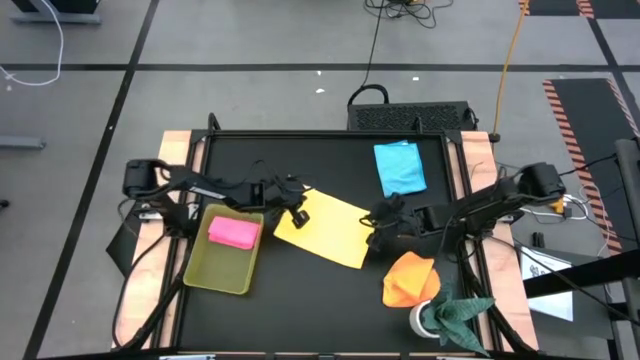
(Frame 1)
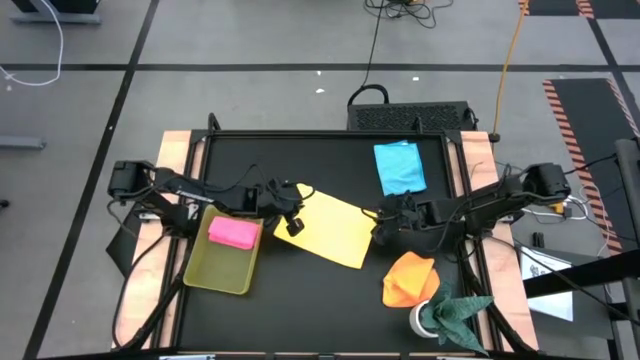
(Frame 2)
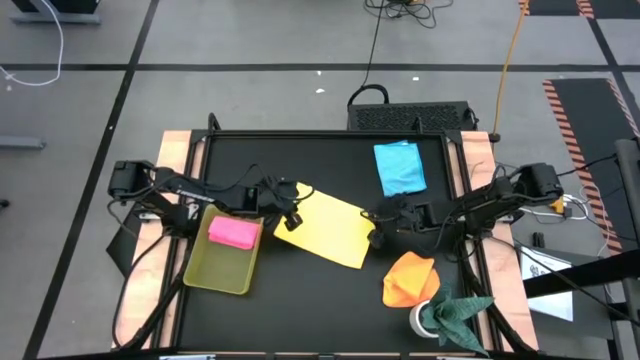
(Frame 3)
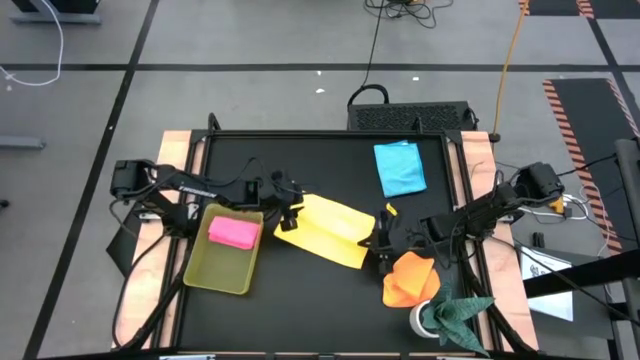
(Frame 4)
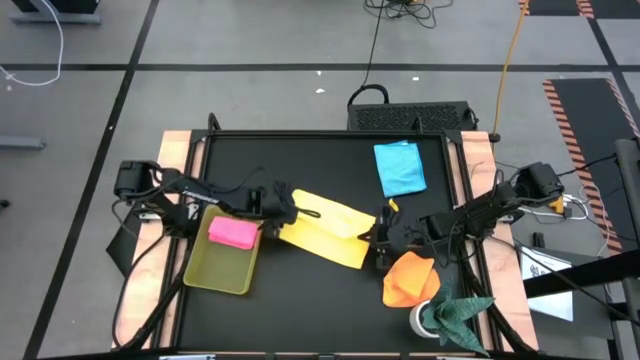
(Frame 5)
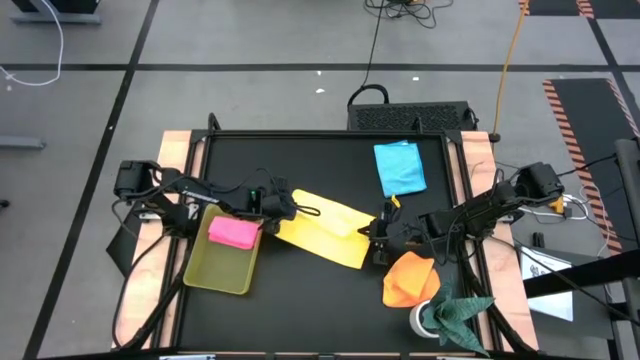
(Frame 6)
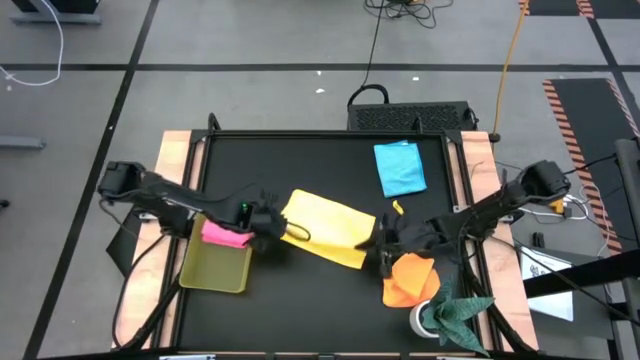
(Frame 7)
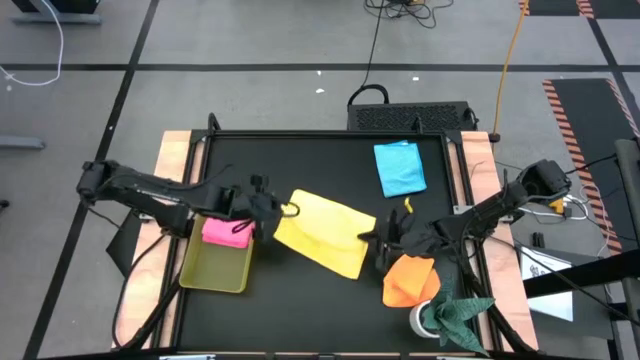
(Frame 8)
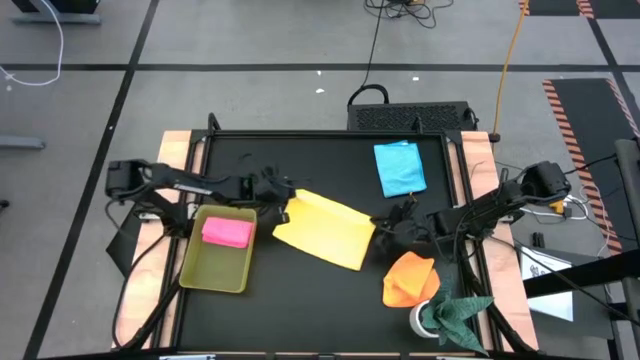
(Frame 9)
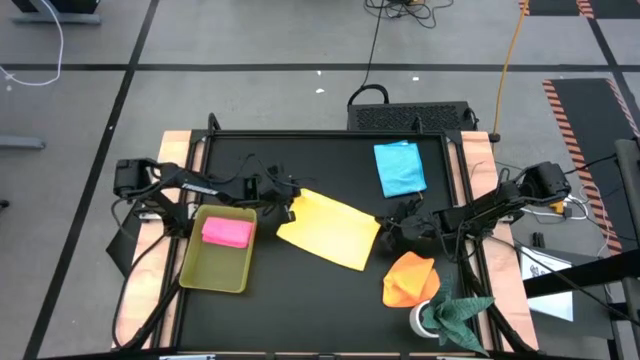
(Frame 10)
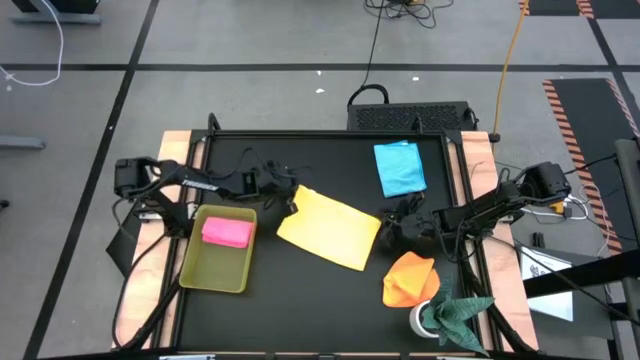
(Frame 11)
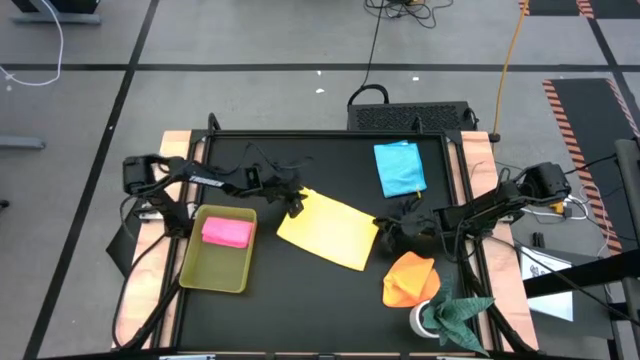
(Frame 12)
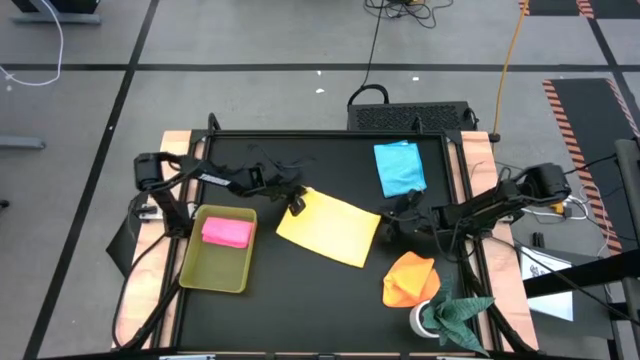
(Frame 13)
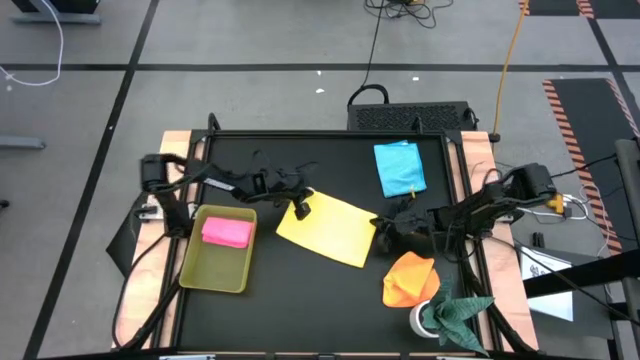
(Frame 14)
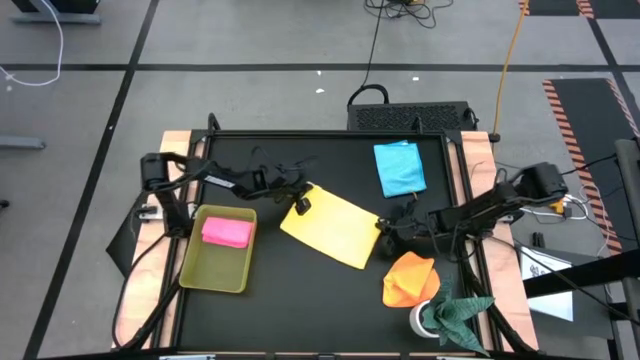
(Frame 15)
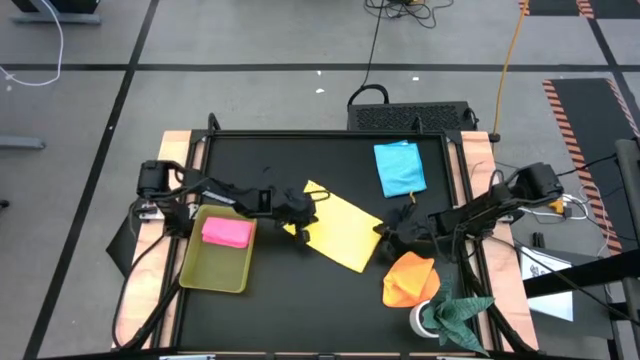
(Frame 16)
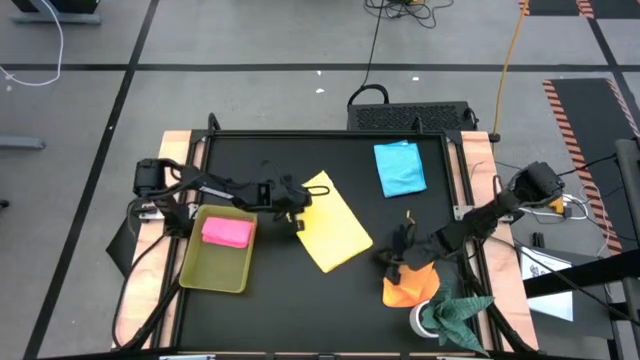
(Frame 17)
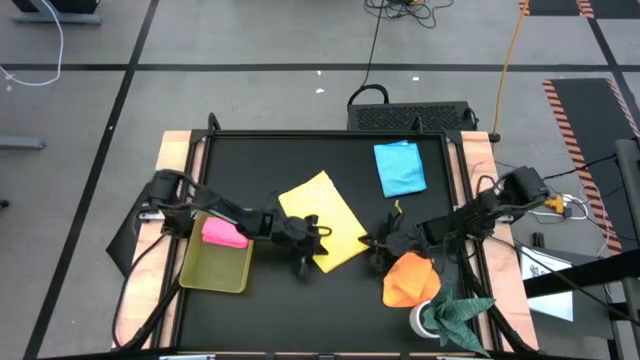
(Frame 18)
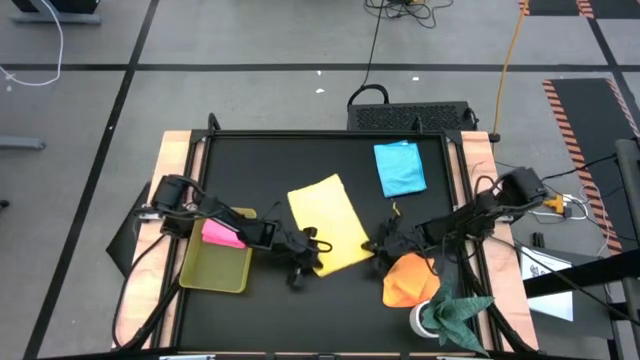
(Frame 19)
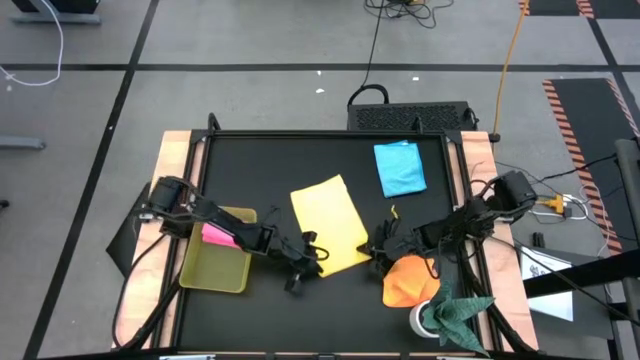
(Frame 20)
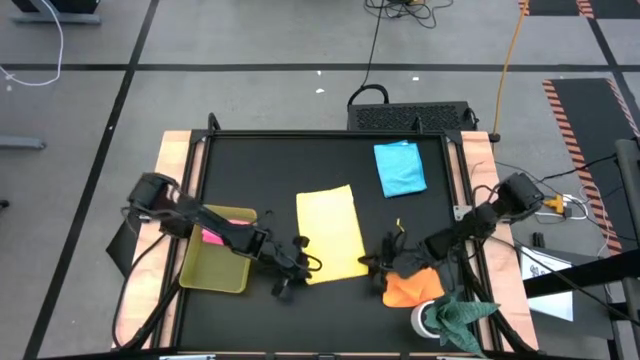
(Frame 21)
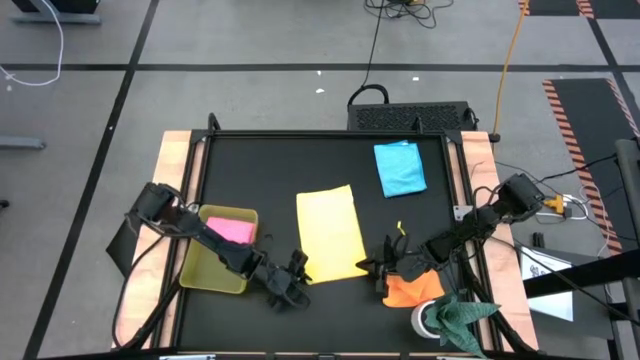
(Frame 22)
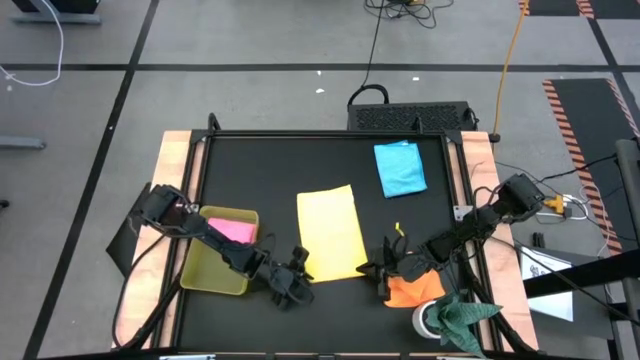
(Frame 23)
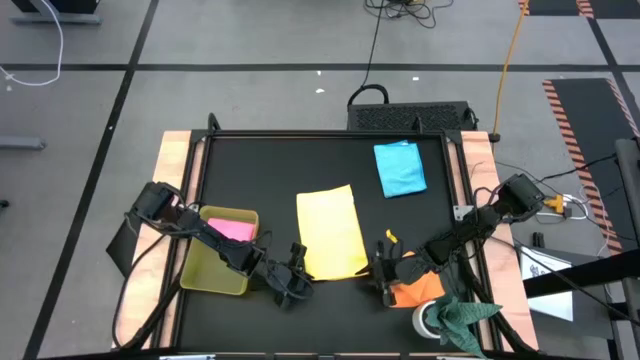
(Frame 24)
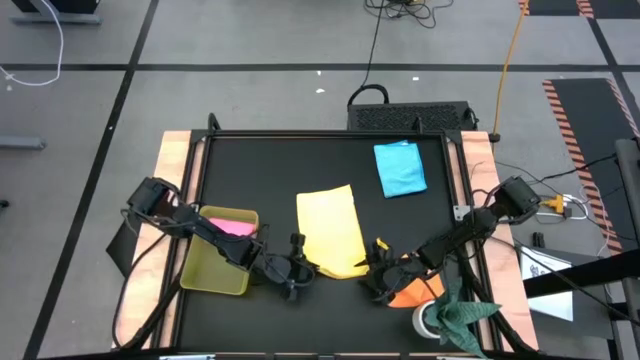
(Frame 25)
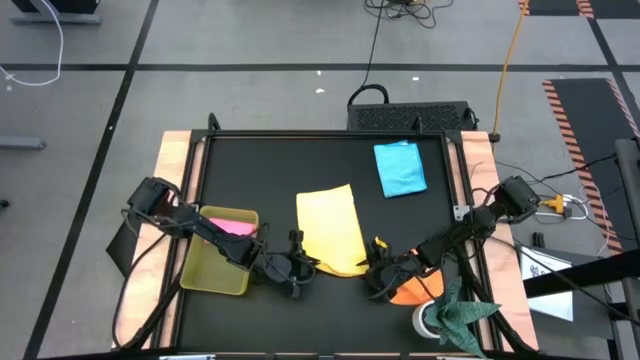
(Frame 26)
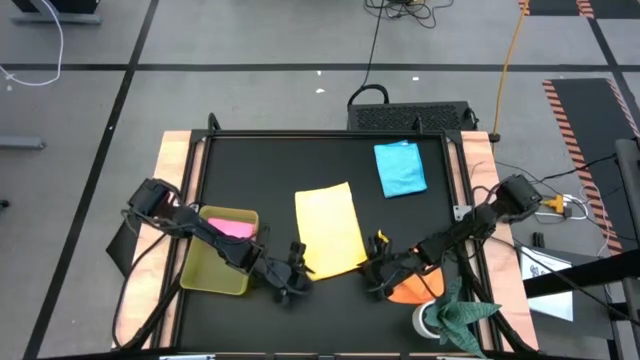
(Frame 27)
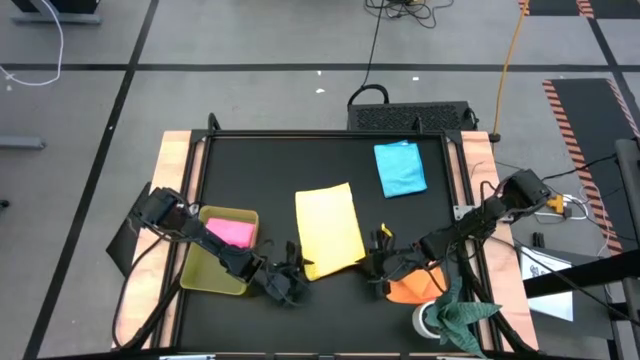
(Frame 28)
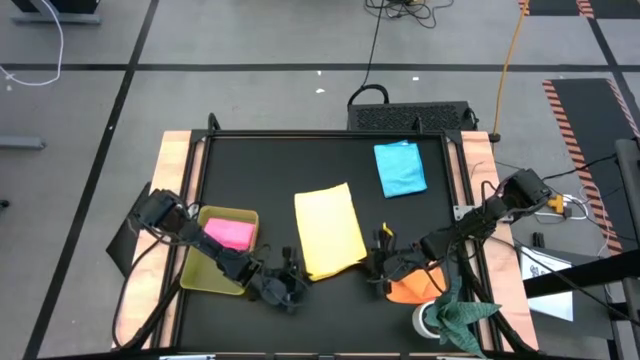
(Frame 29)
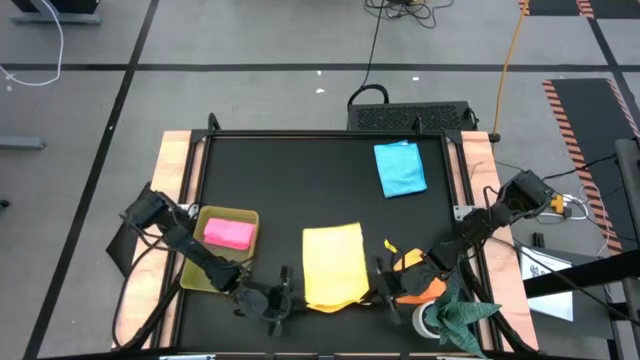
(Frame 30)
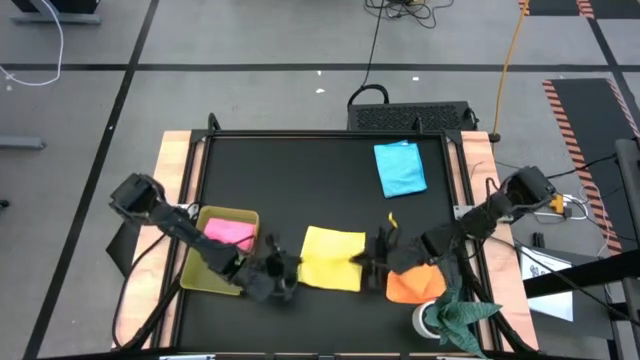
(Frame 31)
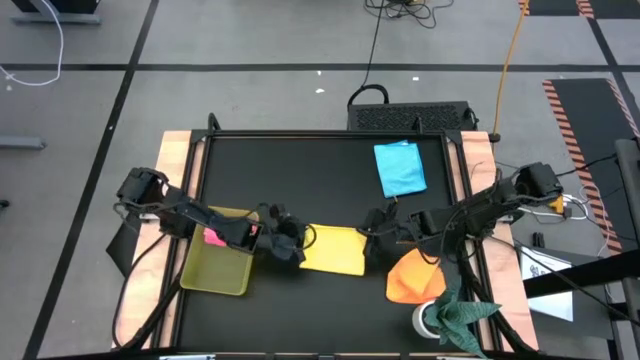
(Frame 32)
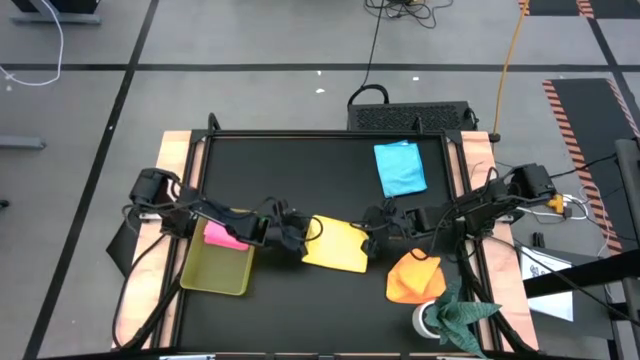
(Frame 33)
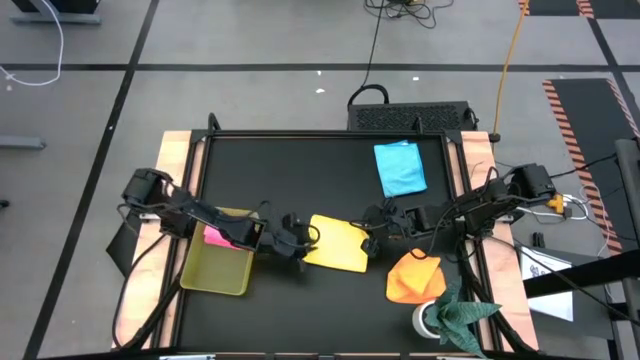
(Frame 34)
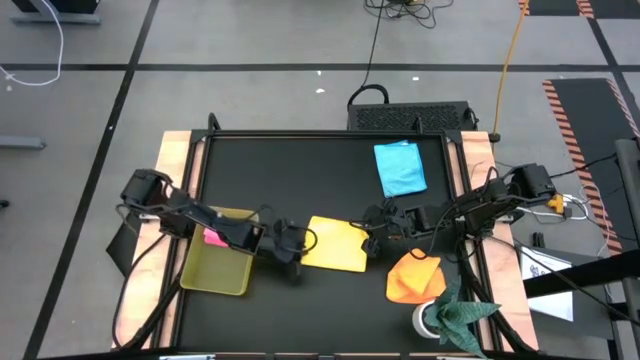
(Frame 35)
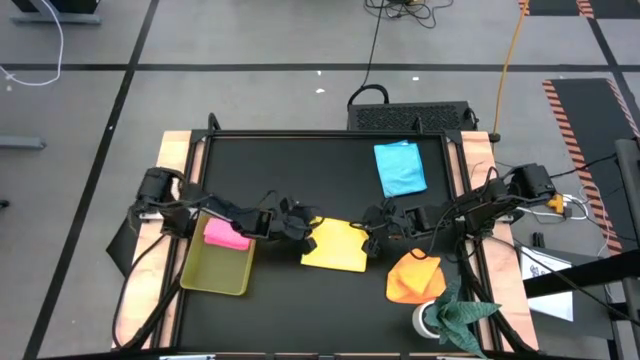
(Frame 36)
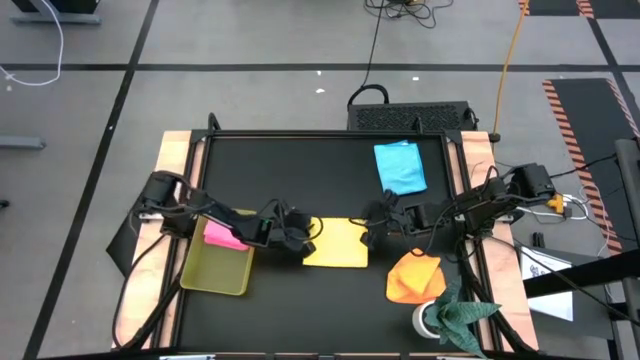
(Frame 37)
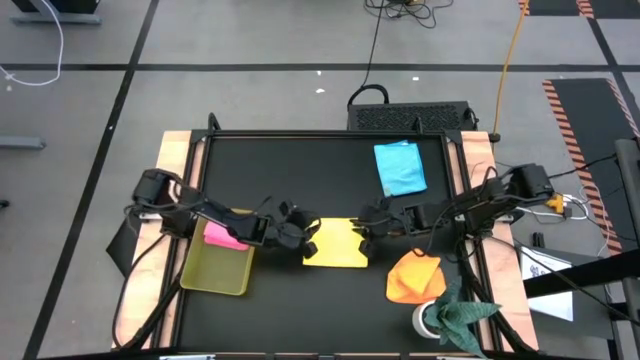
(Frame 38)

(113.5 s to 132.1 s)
Task: Fold microfiber towels
Fold the yellow microfiber towel

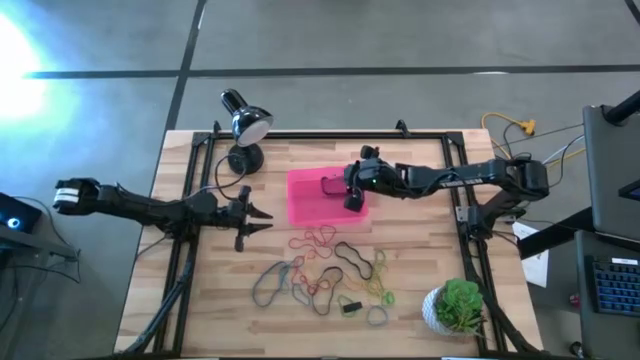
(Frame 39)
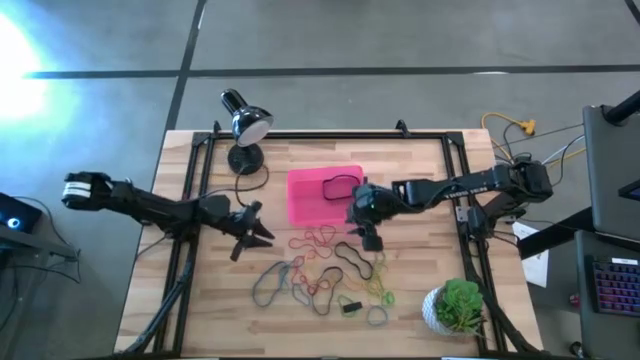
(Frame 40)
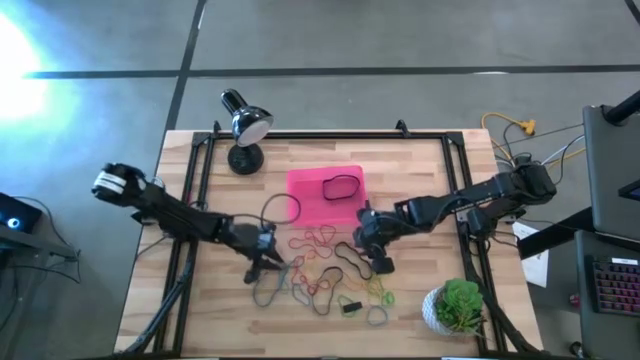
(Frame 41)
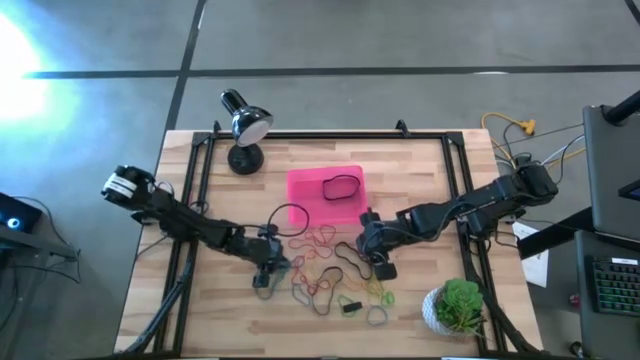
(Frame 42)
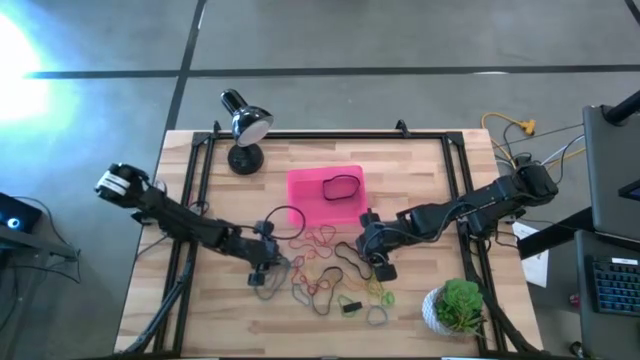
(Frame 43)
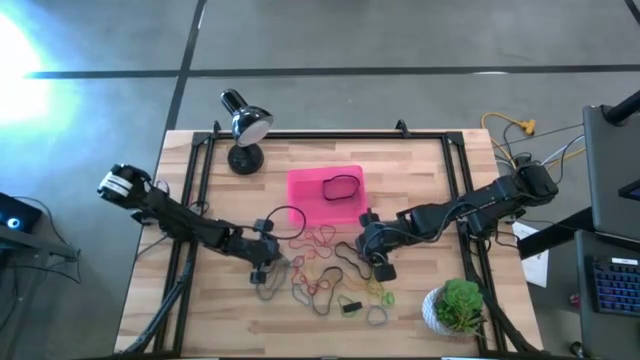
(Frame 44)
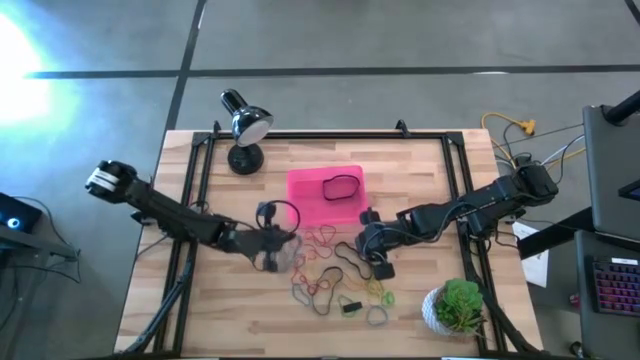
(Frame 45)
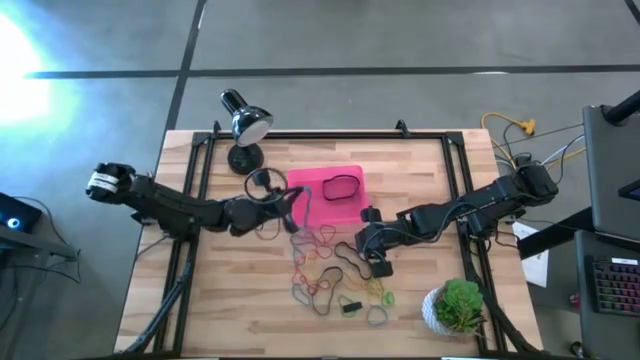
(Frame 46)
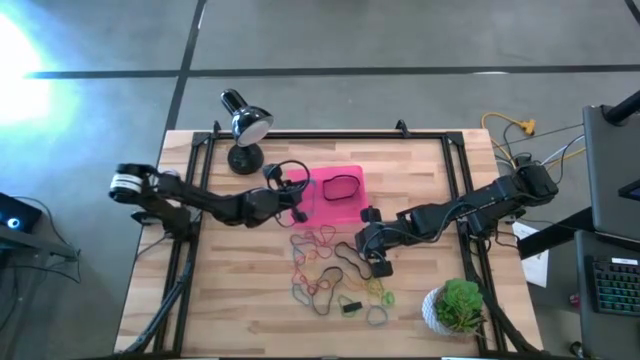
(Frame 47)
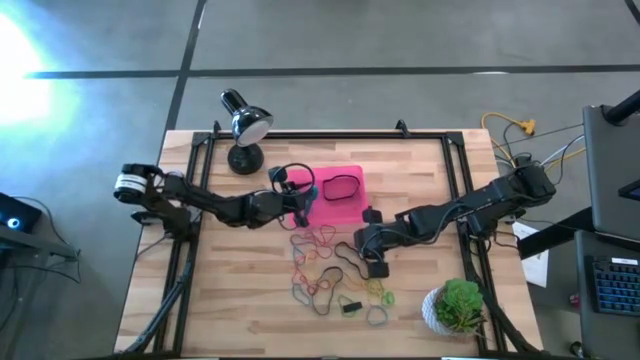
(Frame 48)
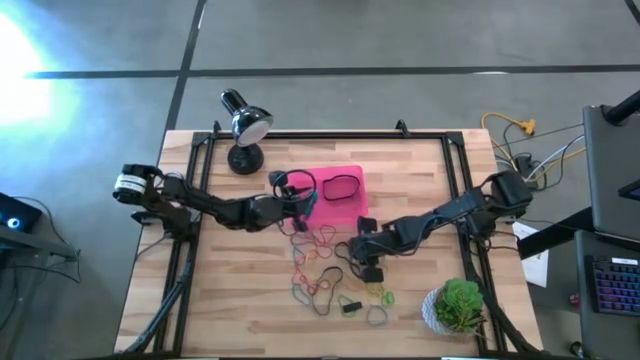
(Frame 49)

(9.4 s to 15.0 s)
Task: Pick and place rubber bands into bin
Put the blue rubber band into the red bin
